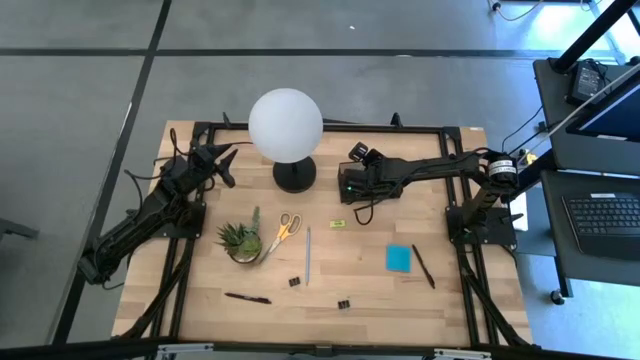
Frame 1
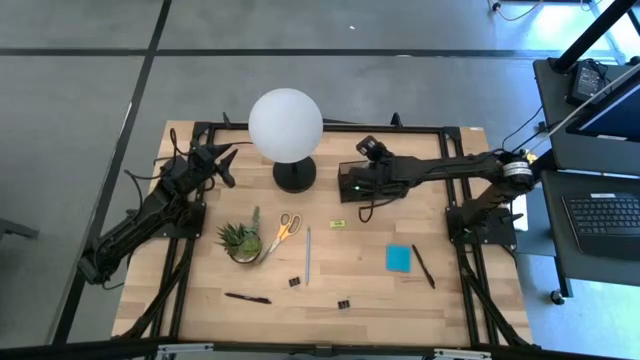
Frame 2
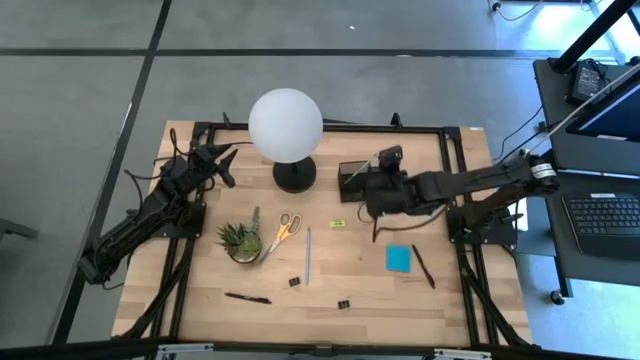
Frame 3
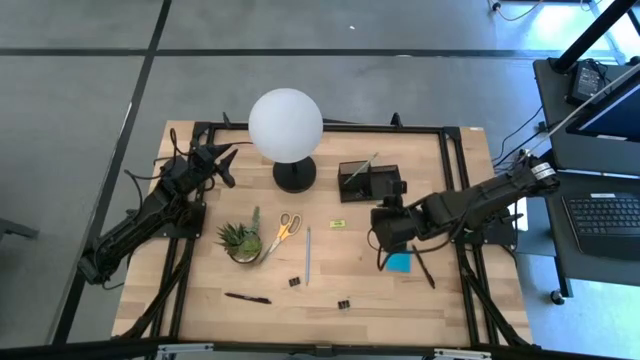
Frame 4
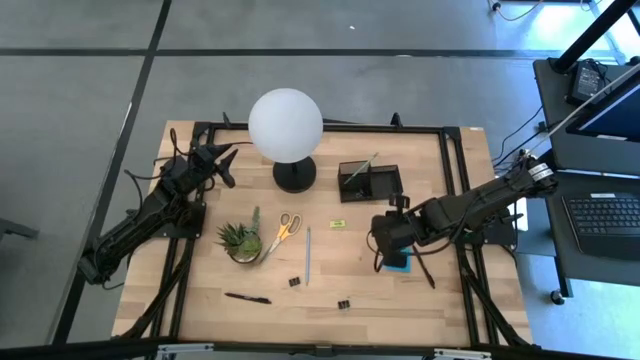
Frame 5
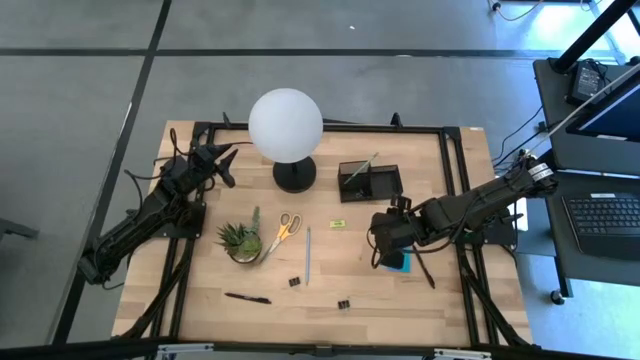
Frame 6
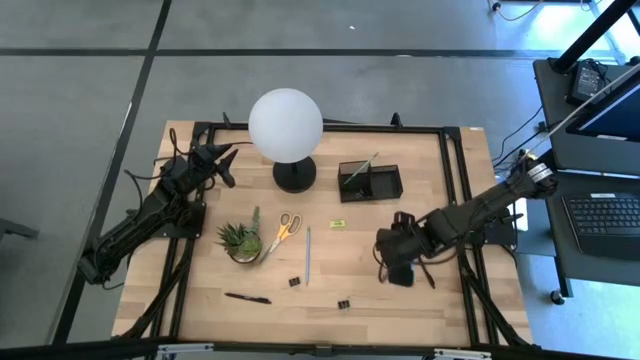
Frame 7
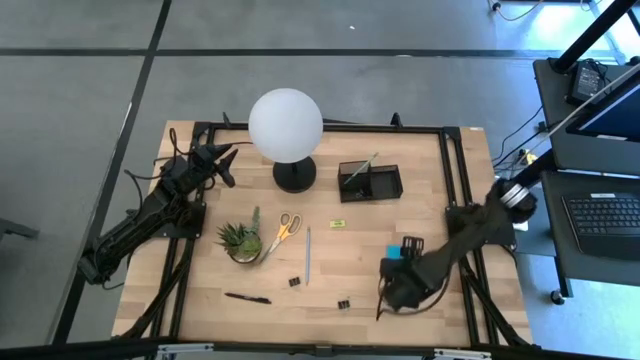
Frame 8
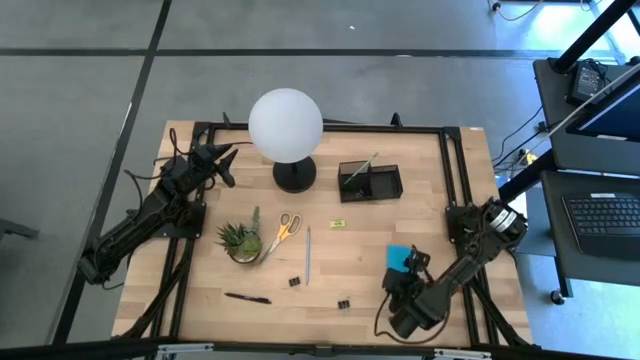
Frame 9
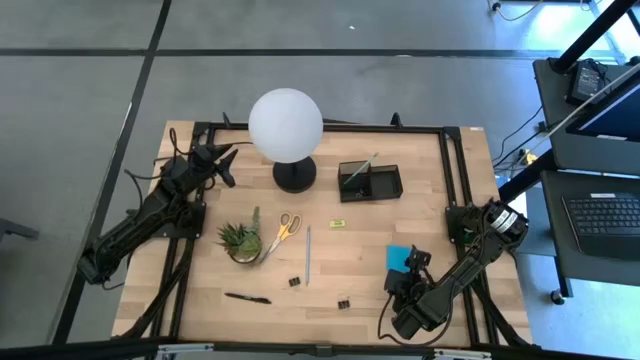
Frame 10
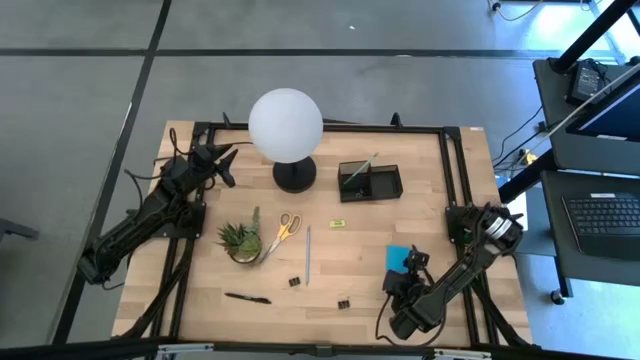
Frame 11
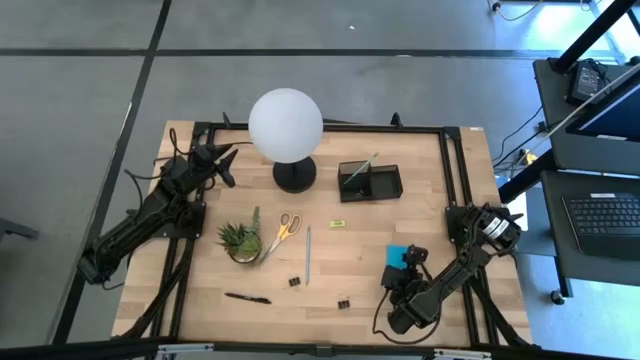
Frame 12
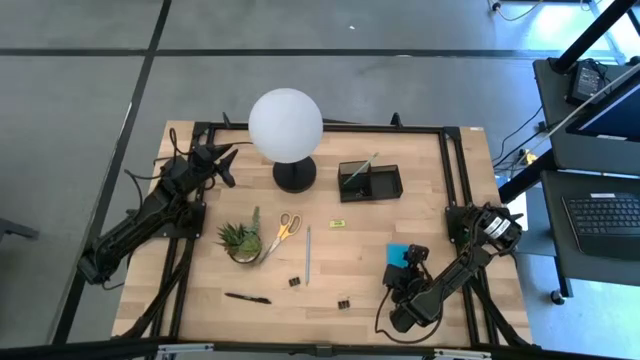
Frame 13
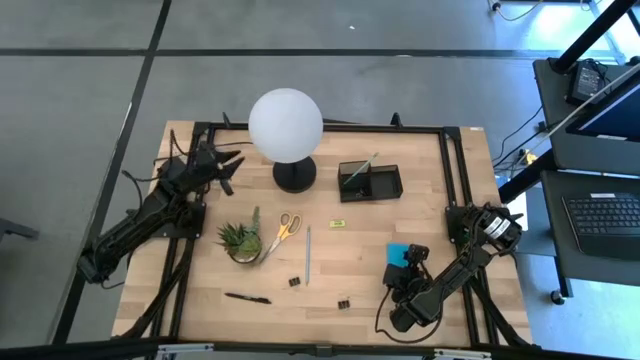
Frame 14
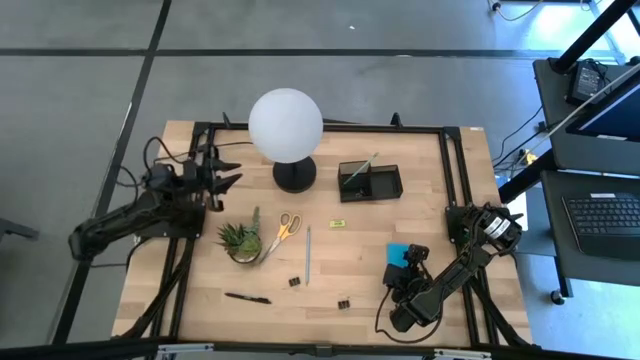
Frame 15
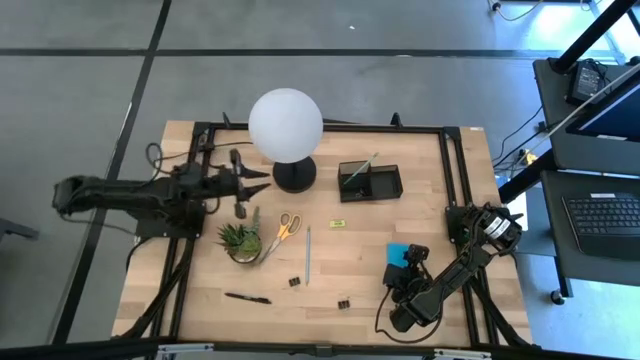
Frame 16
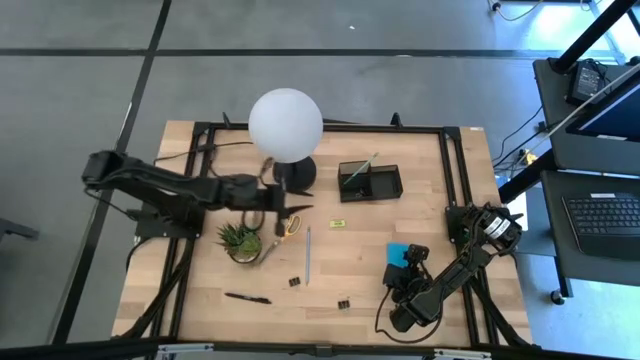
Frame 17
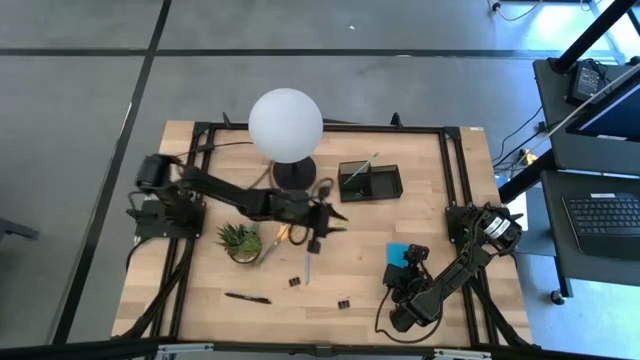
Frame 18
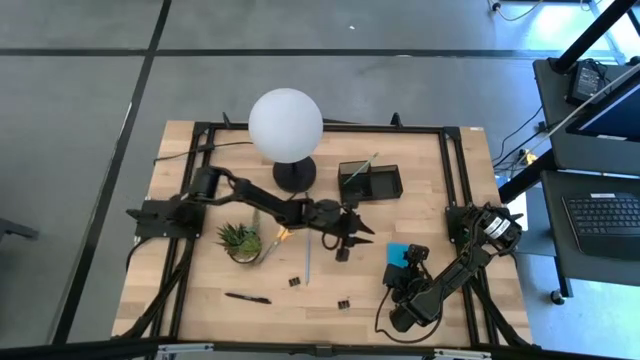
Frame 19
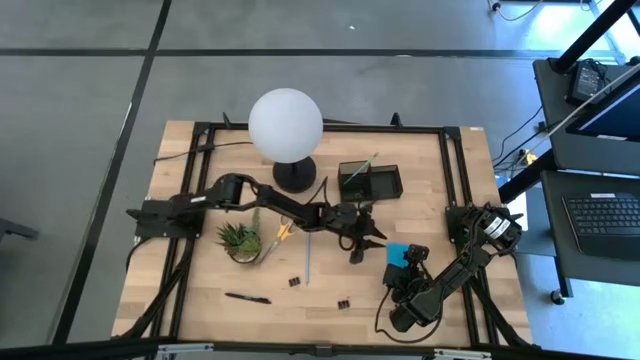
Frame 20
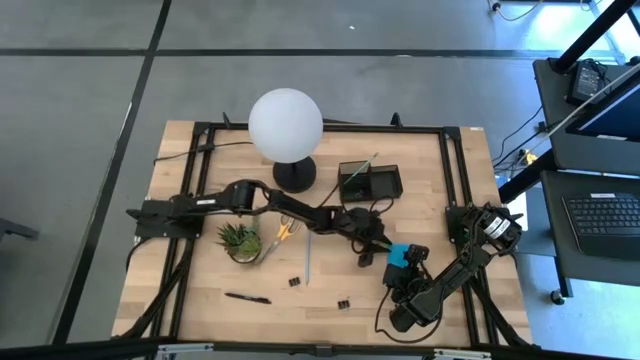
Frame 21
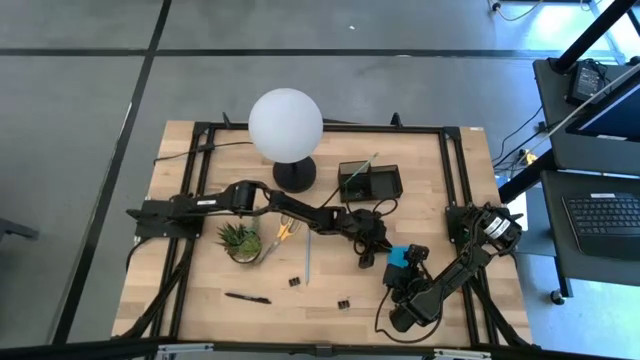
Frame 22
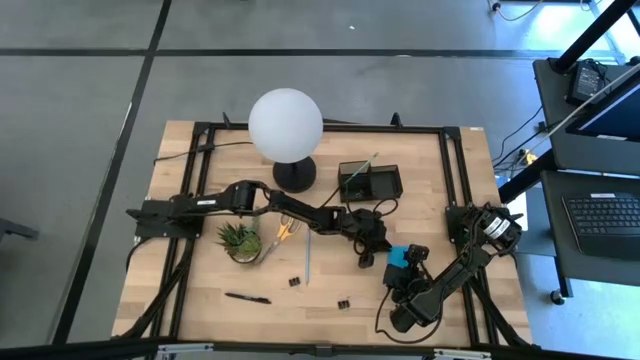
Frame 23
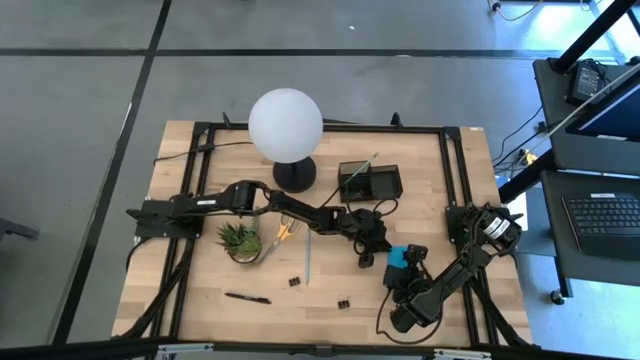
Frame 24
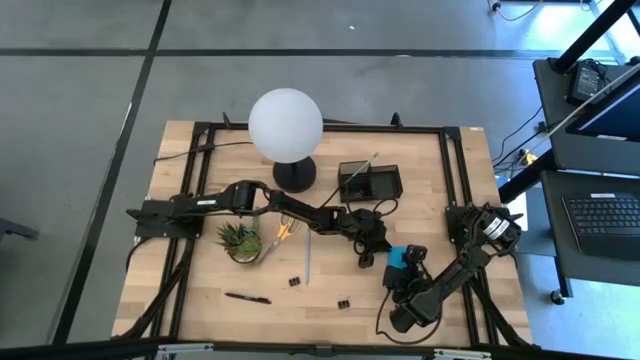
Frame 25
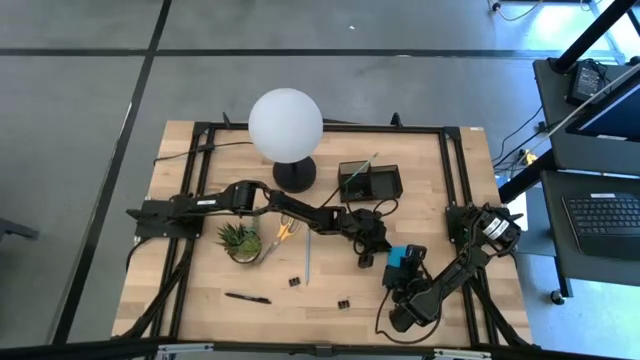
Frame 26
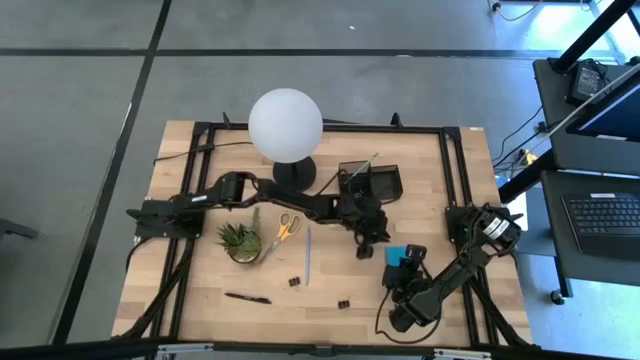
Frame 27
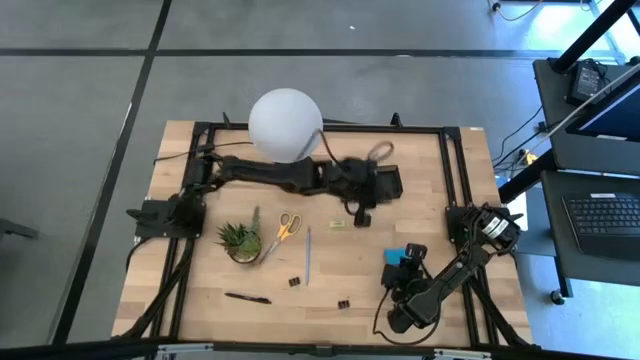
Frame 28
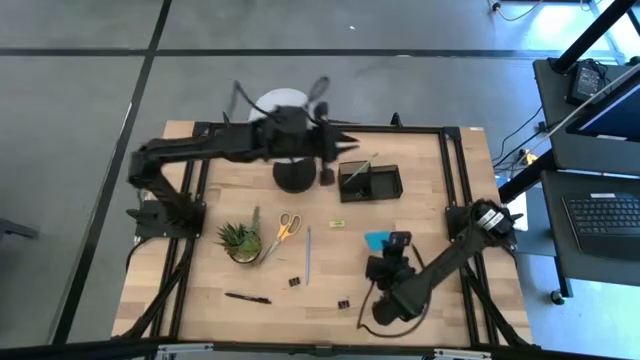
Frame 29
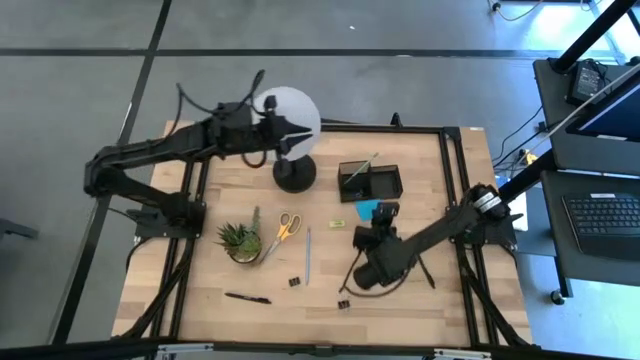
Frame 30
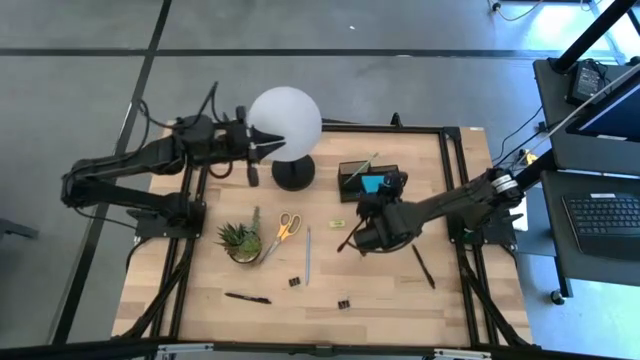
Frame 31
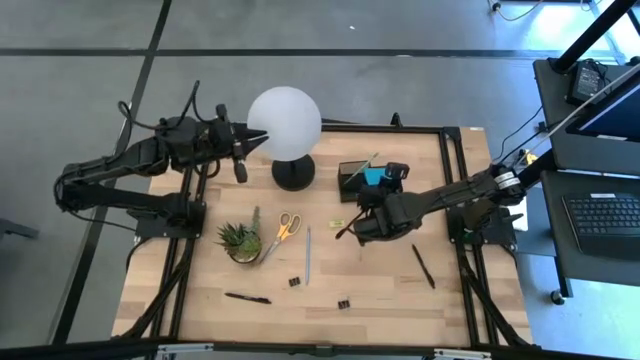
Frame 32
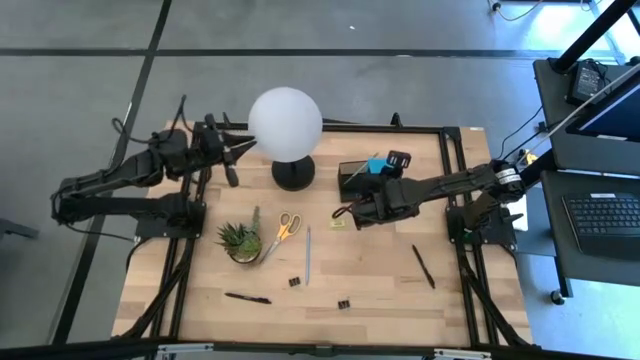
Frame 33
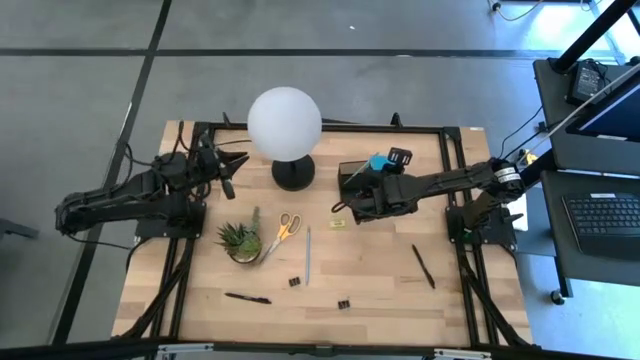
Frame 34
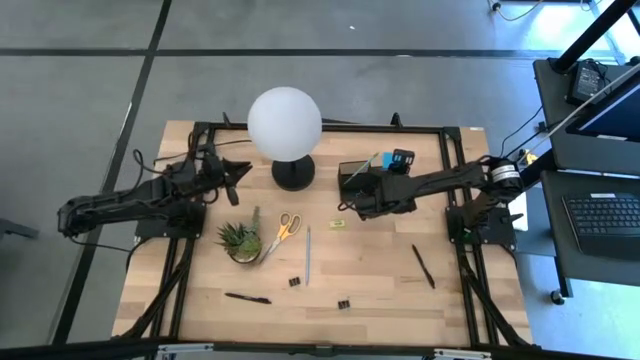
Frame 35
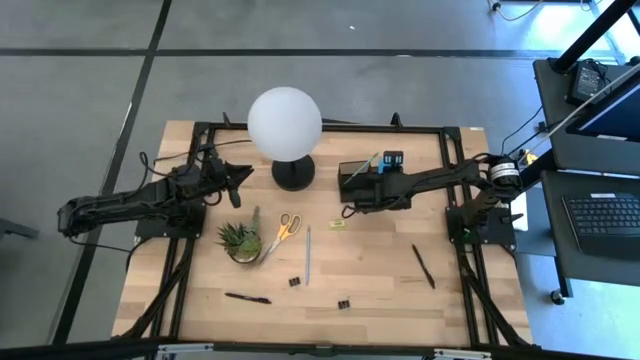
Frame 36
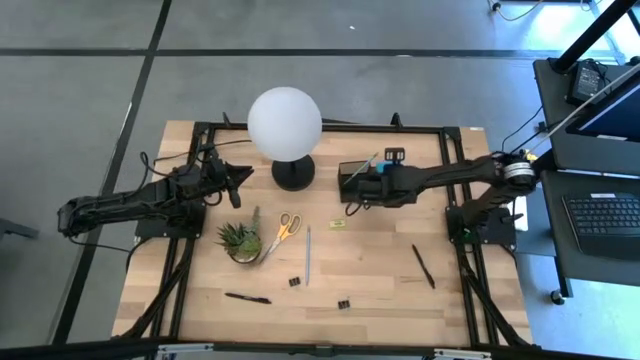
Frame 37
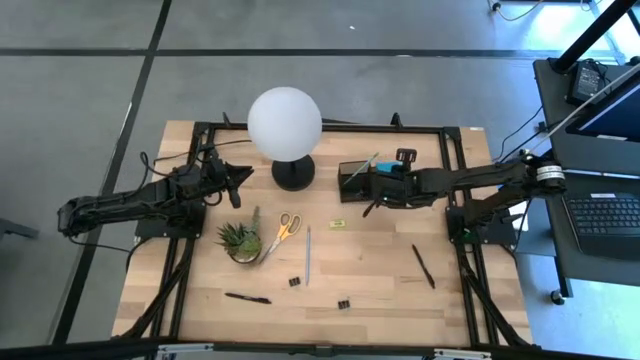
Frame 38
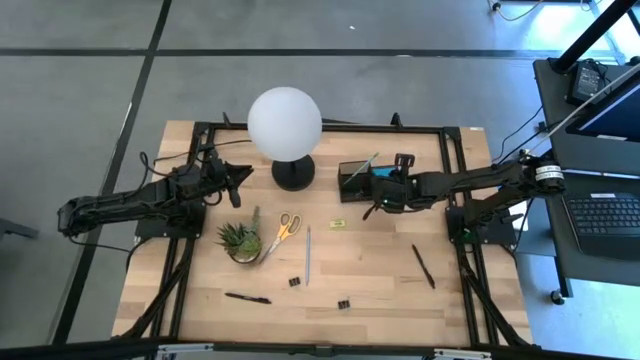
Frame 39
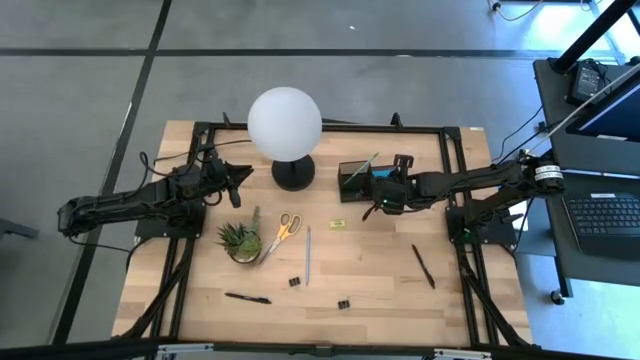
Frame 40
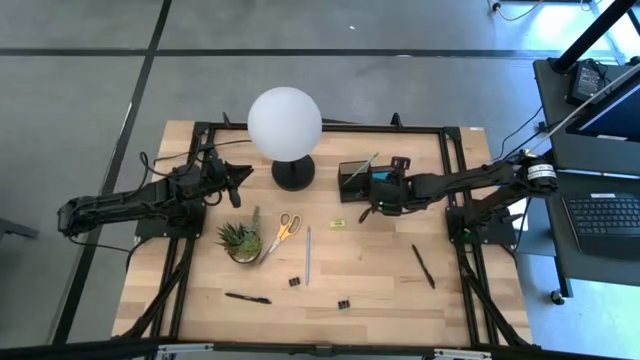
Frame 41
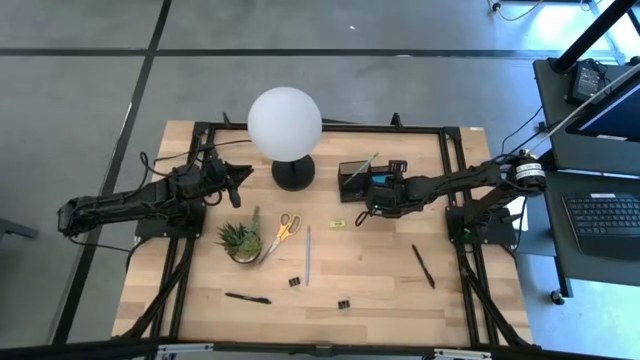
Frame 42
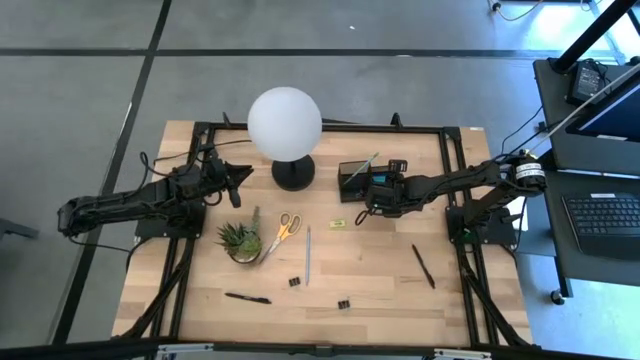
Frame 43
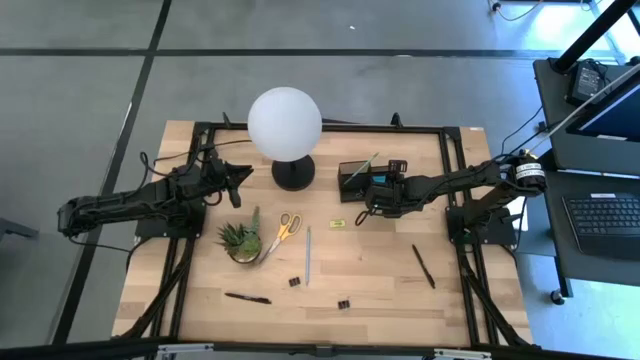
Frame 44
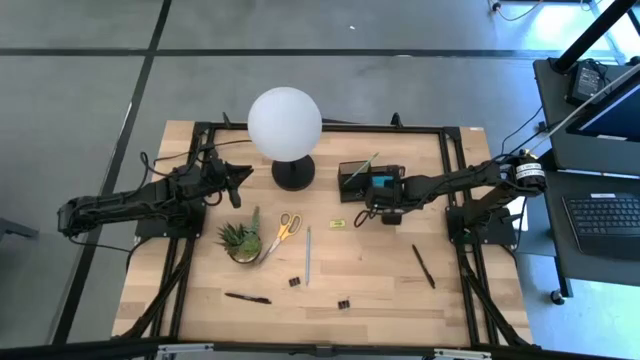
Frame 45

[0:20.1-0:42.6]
Task: Pick and place office supplies into organizer
Put the blue sticky note into the desk organizer
